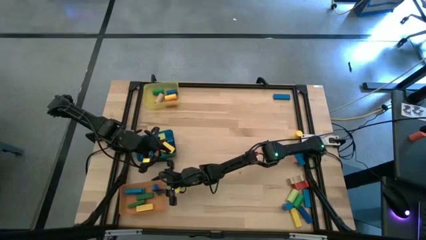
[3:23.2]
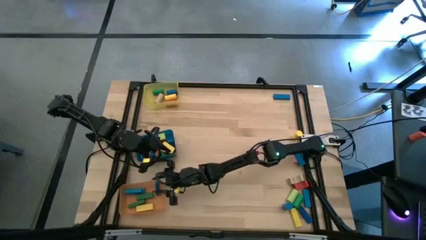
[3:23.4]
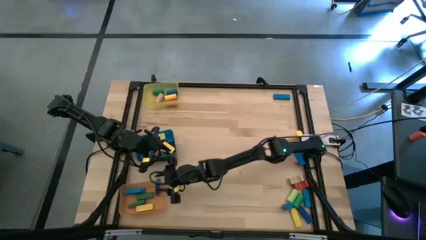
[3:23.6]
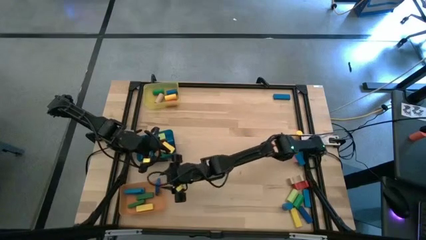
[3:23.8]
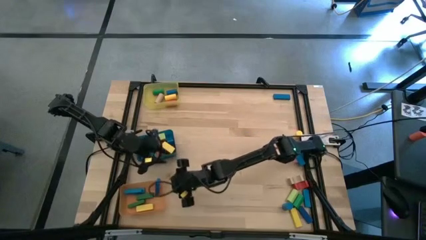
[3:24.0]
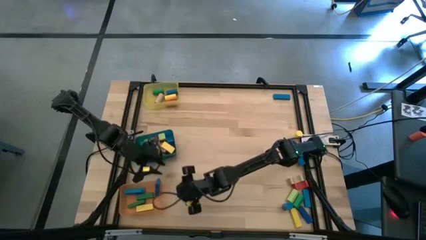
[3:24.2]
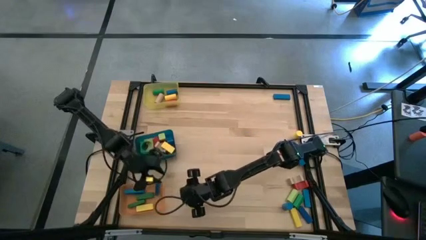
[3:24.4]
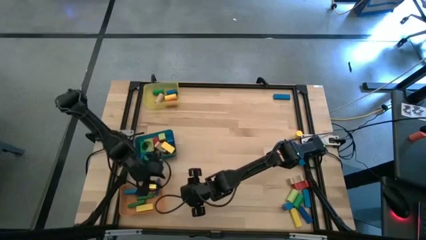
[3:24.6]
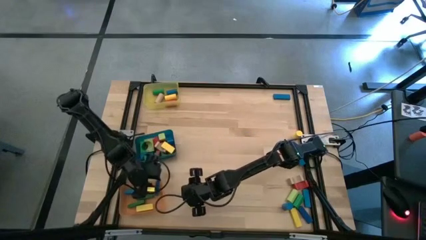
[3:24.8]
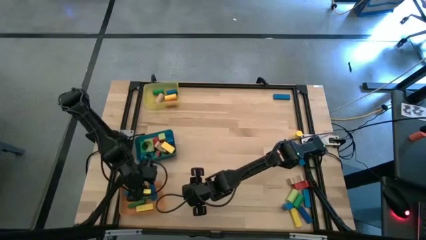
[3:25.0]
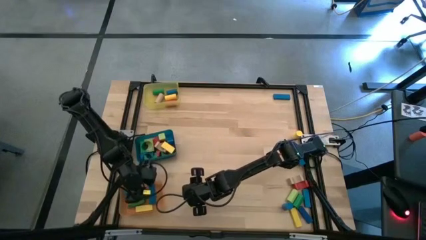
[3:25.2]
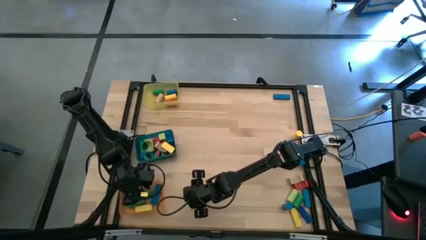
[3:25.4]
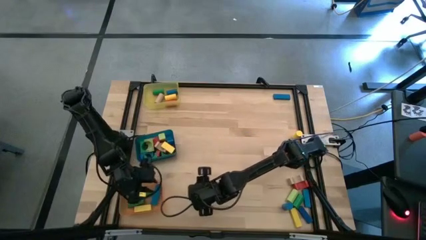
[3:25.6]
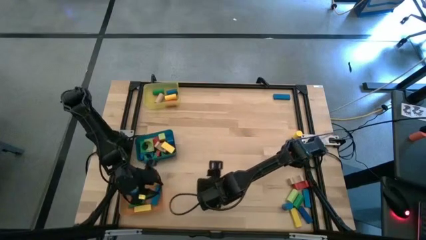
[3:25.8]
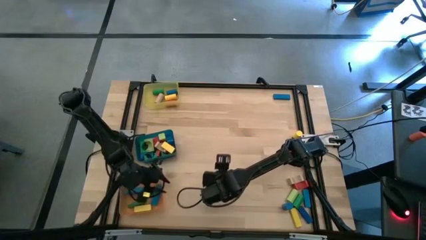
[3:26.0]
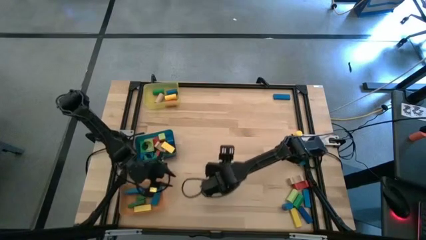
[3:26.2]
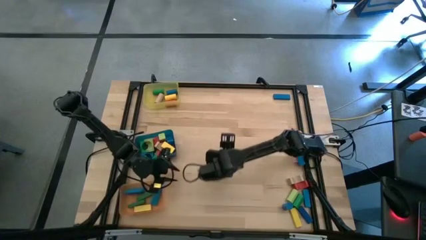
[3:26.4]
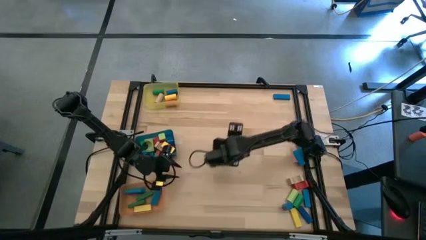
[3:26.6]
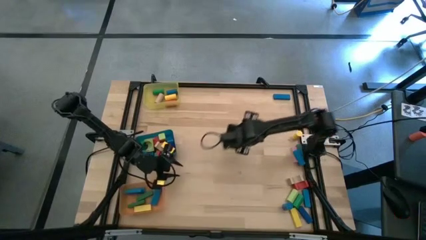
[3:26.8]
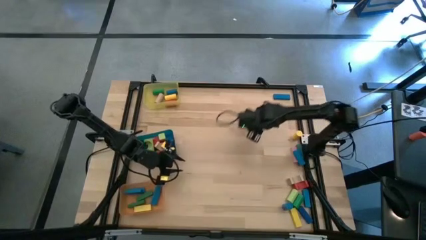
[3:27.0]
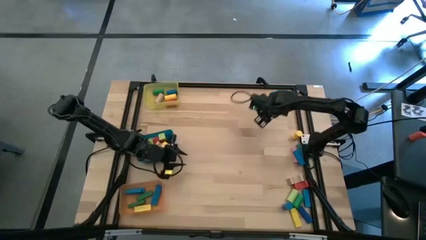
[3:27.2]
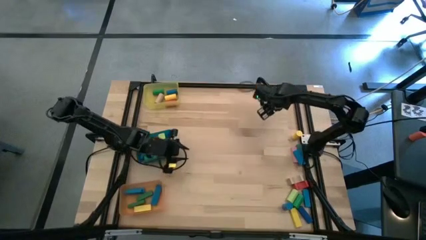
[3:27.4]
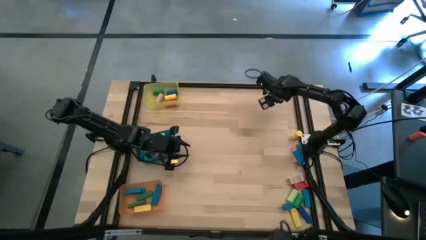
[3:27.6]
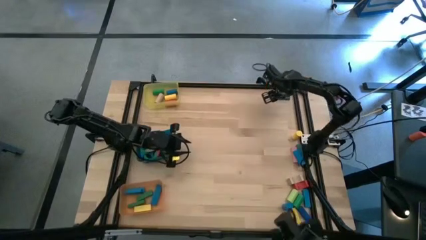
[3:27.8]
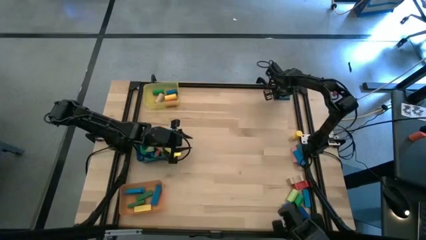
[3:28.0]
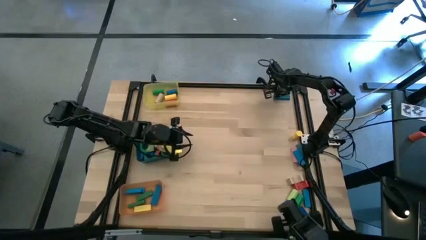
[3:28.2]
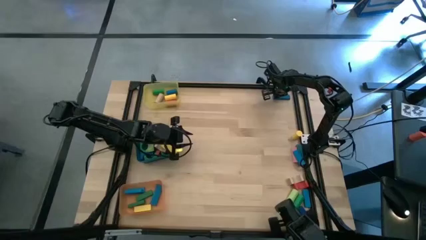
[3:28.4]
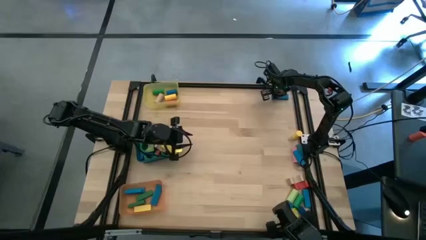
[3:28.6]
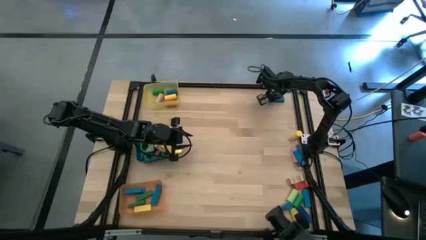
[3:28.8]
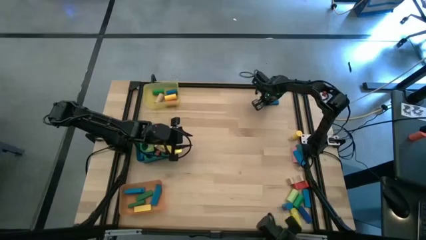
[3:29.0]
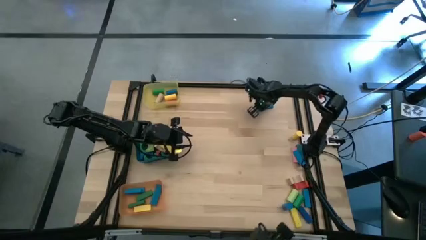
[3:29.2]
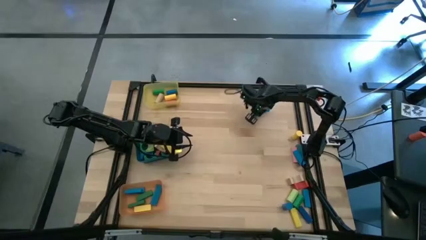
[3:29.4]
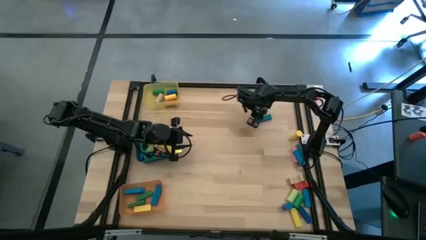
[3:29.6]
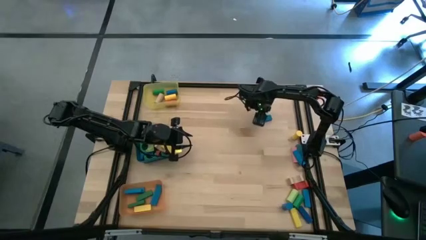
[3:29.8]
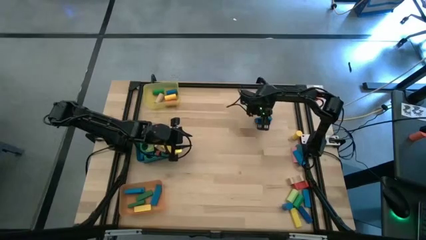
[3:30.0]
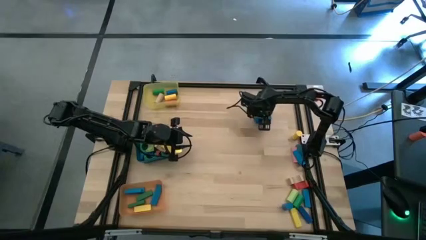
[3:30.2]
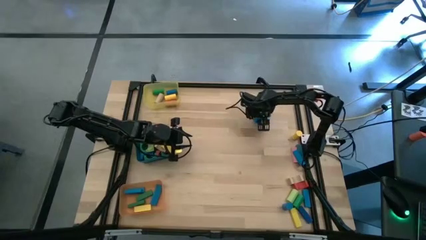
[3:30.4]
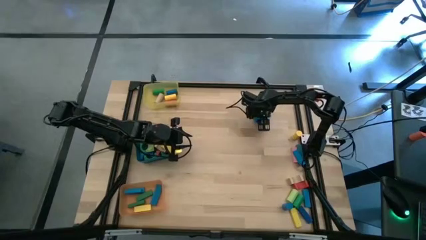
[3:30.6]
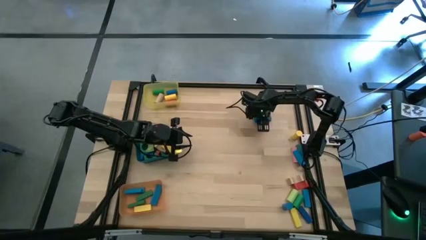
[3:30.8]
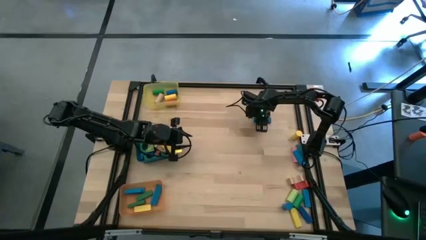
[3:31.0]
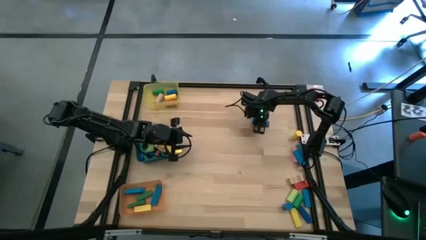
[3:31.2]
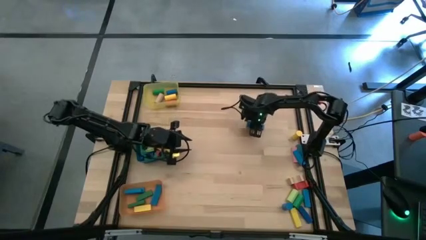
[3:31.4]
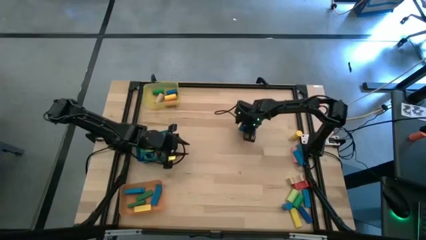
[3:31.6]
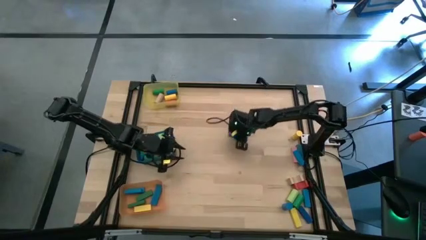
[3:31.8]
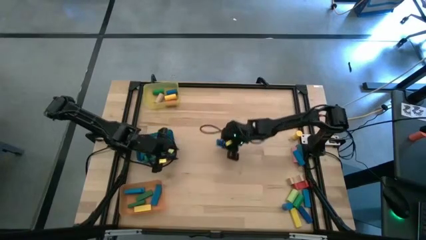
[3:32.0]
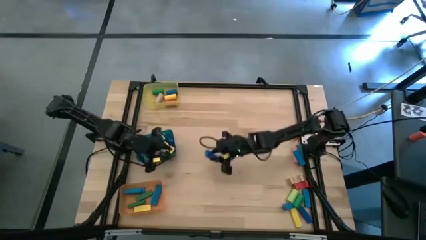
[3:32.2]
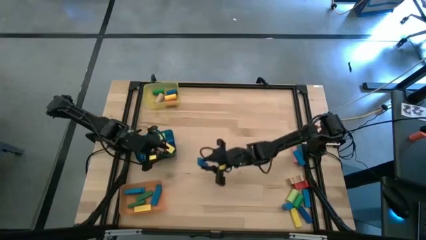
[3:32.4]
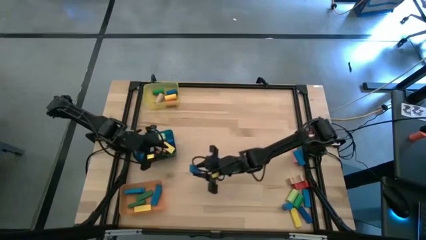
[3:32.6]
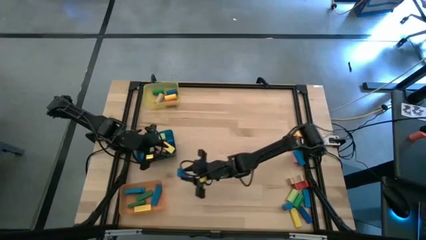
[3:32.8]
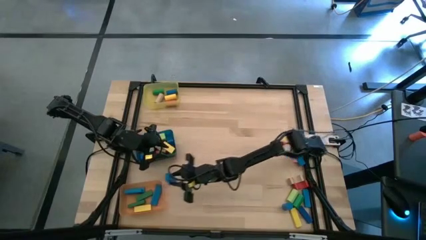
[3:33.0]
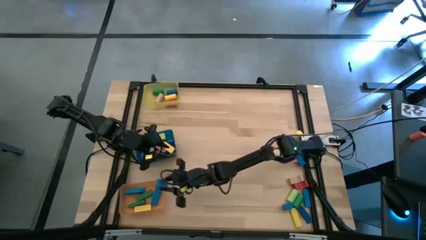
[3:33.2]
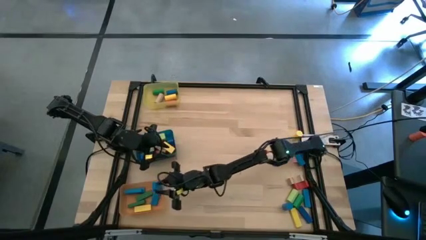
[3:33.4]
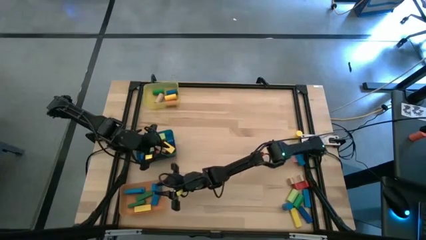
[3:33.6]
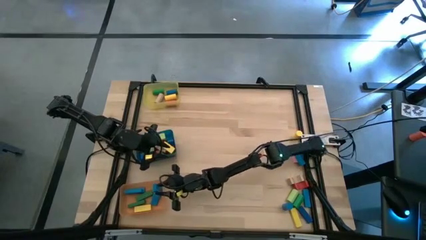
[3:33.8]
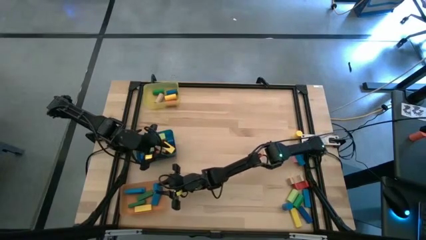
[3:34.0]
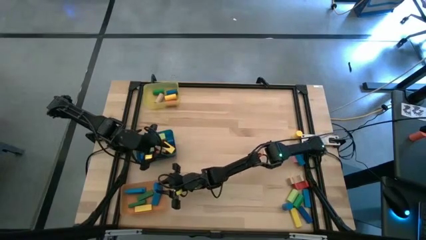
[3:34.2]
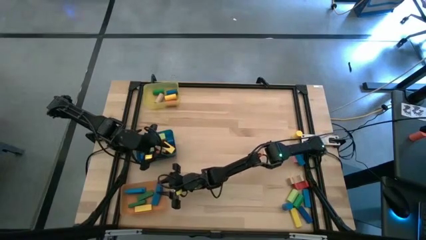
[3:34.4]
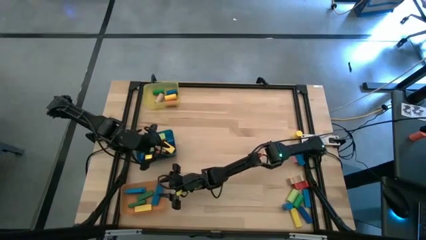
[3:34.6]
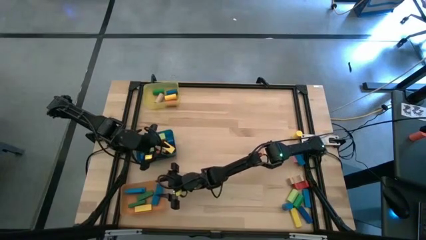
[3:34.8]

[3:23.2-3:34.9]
Task: Sort blocks by size
Put the blue block into the orange bin

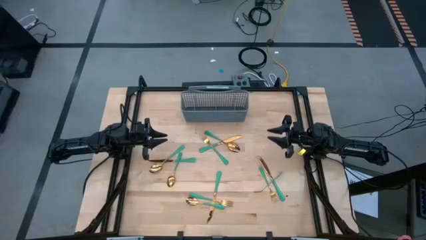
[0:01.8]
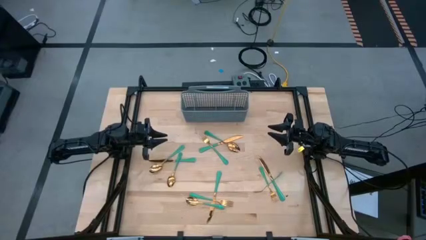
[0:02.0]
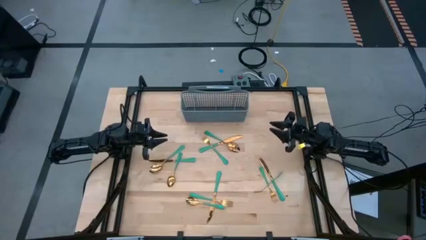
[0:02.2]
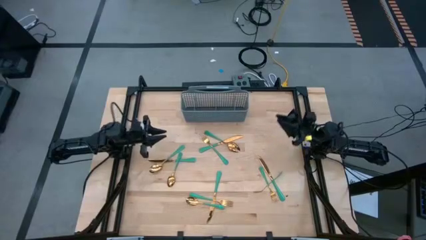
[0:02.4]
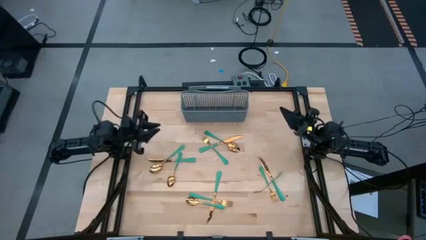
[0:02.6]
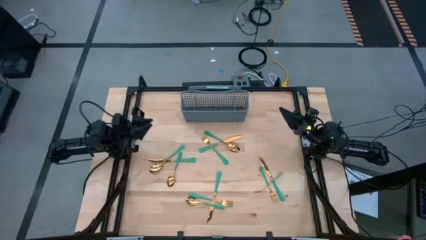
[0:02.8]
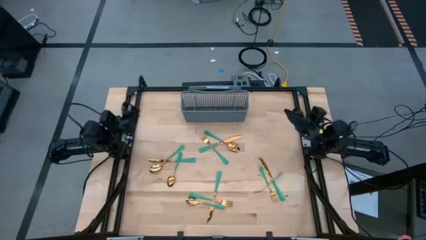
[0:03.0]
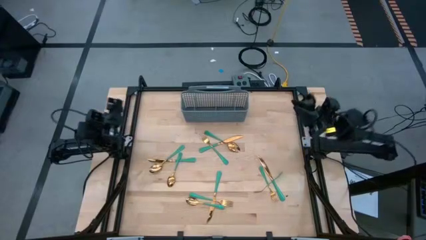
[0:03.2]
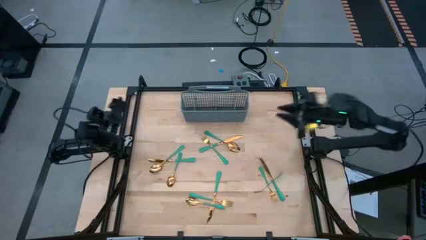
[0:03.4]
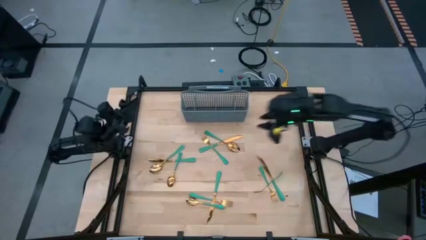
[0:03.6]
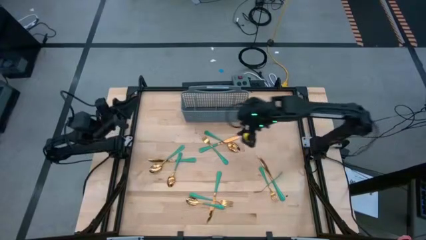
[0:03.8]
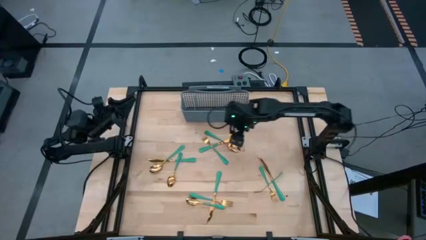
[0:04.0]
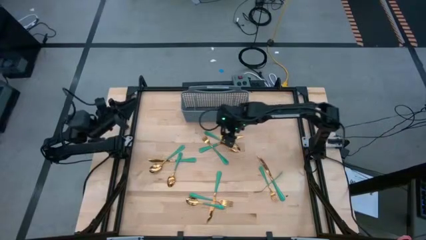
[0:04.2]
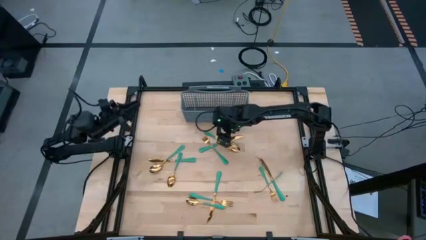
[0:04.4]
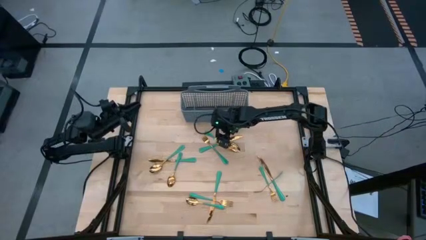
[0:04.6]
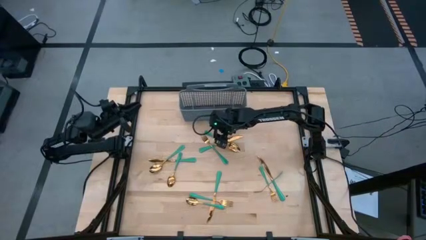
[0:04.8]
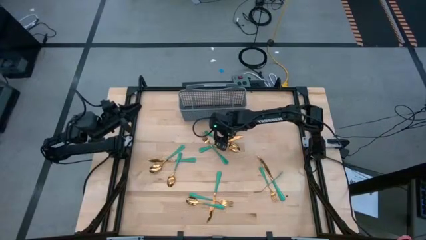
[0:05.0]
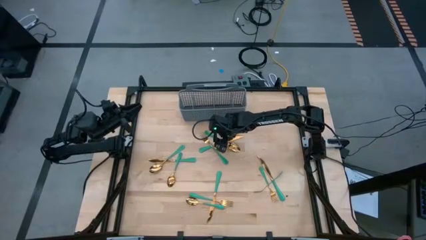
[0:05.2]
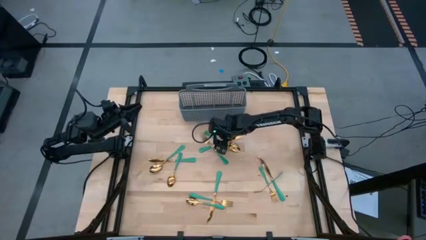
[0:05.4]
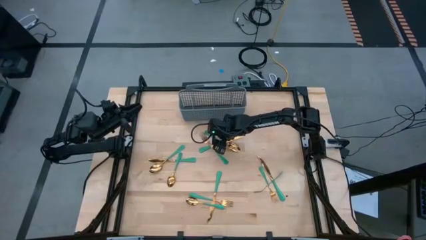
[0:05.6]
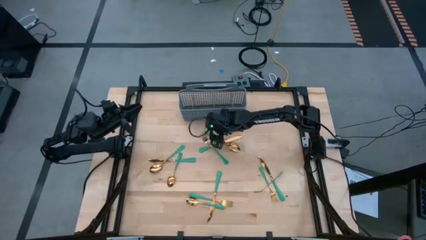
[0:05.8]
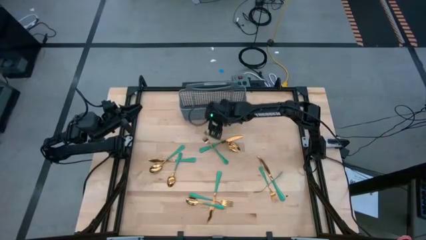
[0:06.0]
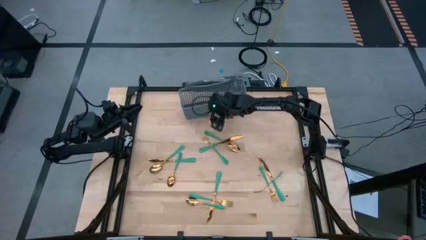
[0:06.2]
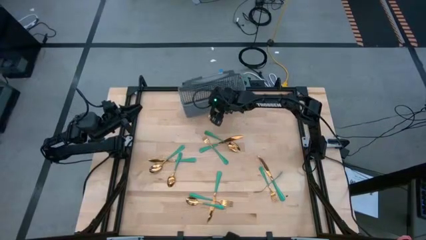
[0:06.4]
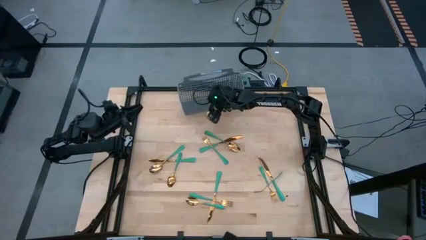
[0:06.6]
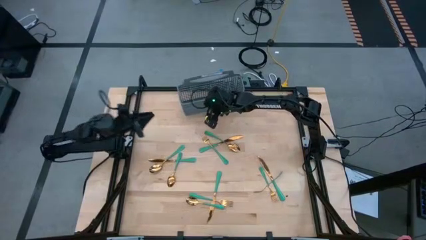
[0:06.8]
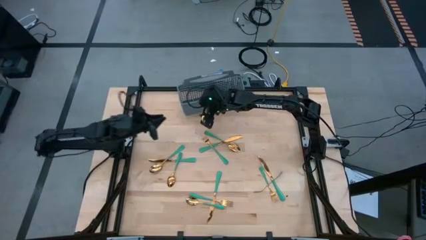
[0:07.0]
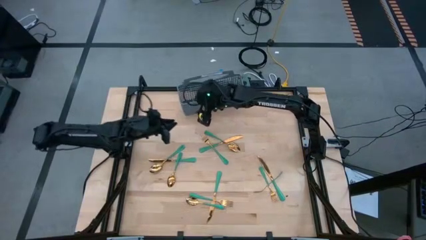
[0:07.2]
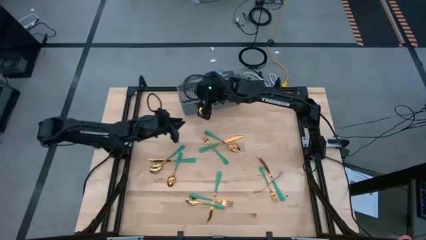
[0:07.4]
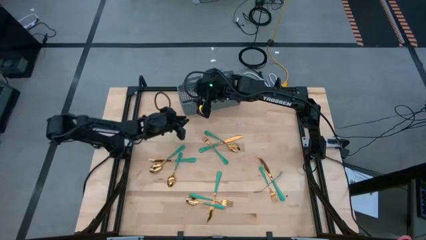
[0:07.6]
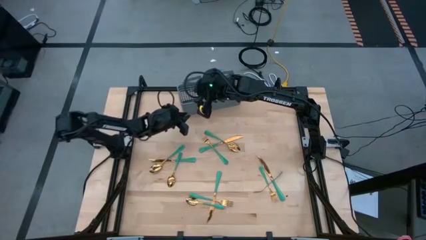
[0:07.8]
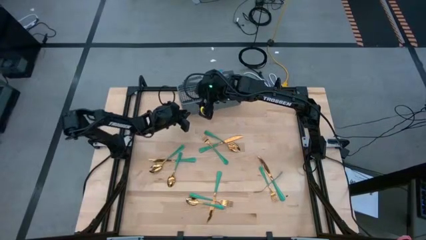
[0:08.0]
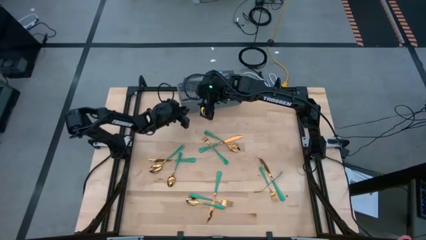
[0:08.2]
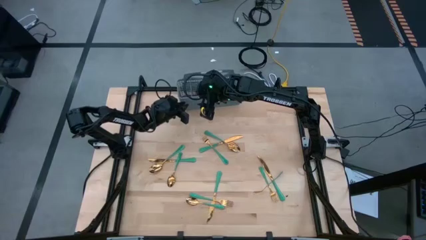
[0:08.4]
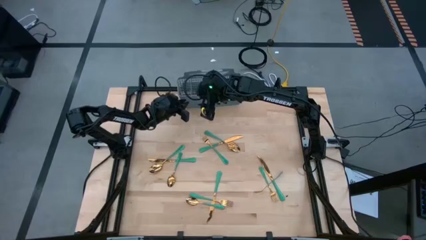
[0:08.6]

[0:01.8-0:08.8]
Task: Sort silverware
Adjust the gray silverware organizer
